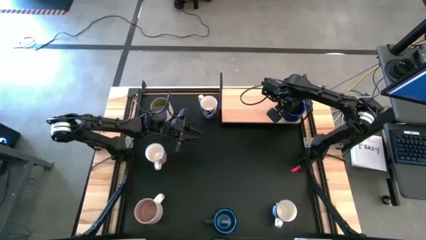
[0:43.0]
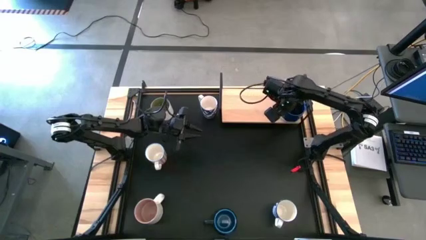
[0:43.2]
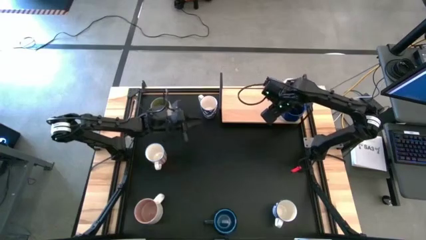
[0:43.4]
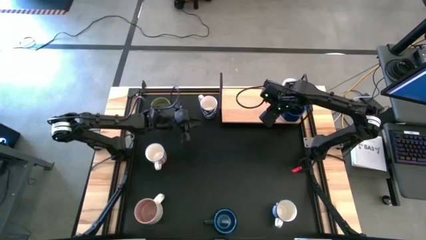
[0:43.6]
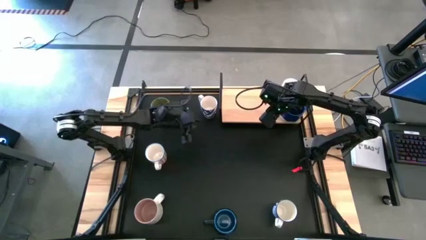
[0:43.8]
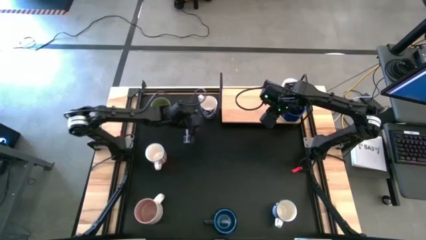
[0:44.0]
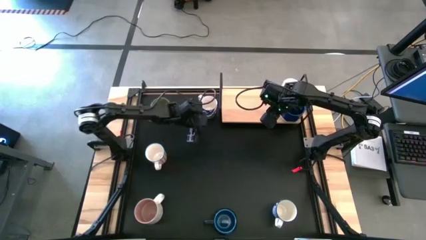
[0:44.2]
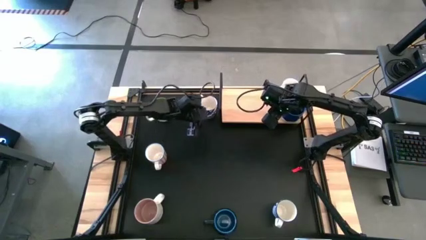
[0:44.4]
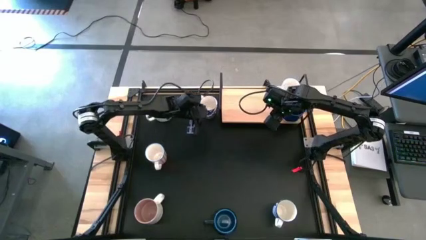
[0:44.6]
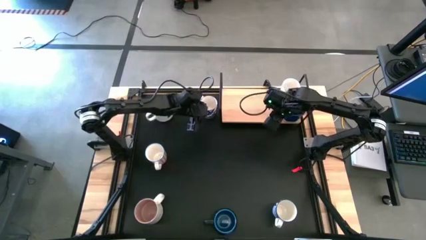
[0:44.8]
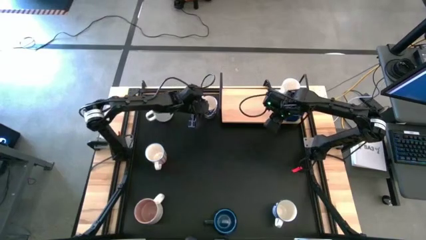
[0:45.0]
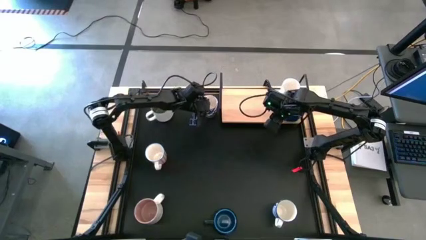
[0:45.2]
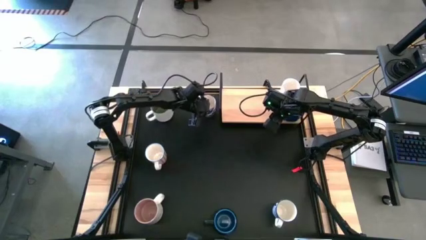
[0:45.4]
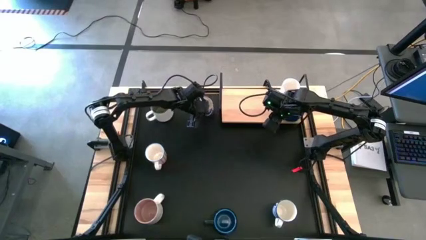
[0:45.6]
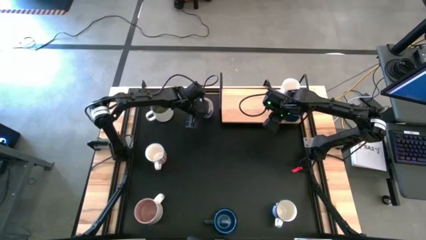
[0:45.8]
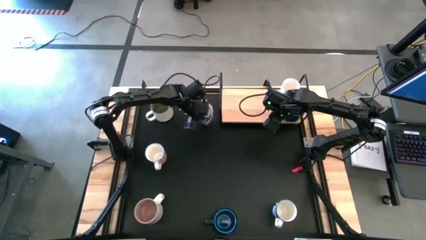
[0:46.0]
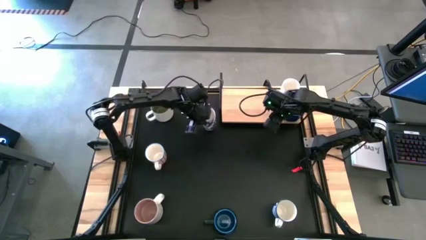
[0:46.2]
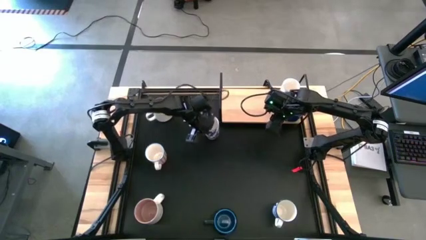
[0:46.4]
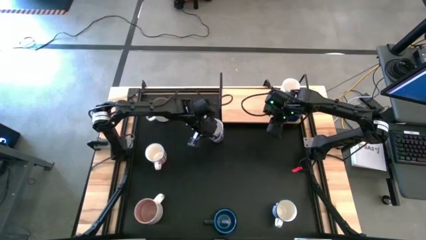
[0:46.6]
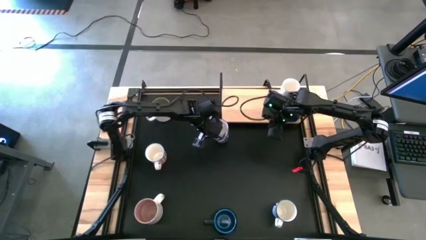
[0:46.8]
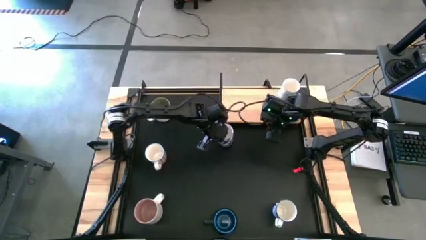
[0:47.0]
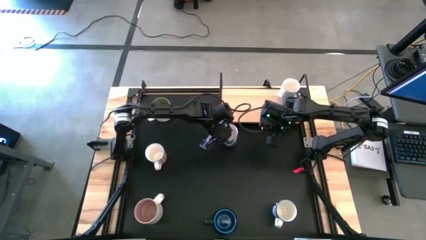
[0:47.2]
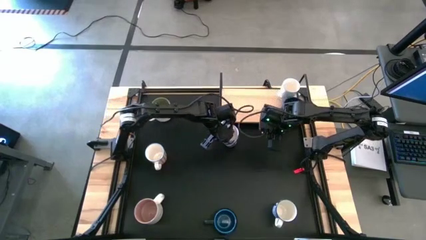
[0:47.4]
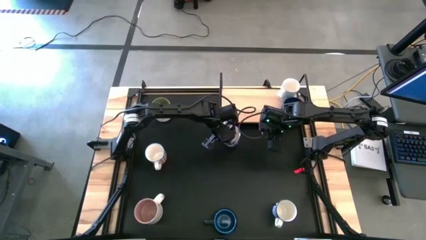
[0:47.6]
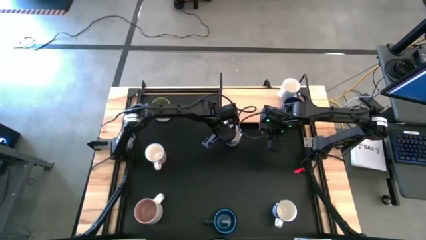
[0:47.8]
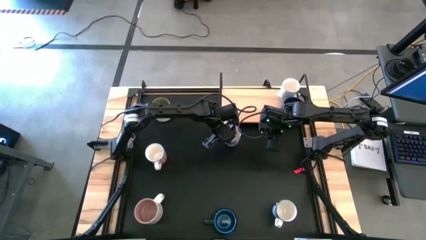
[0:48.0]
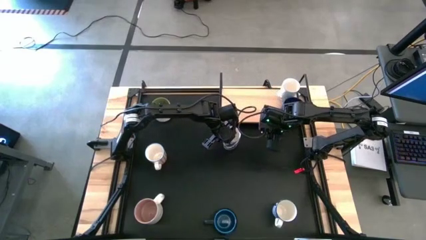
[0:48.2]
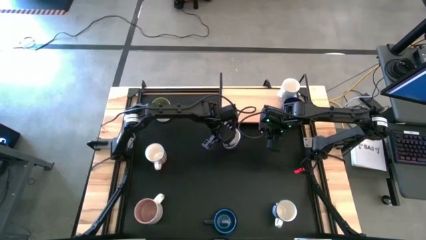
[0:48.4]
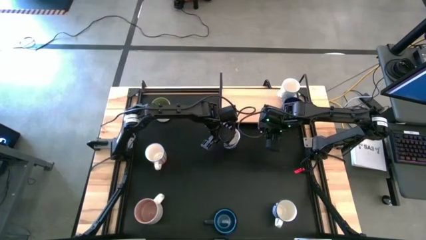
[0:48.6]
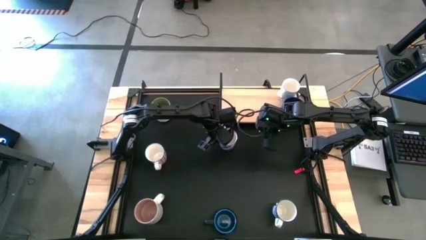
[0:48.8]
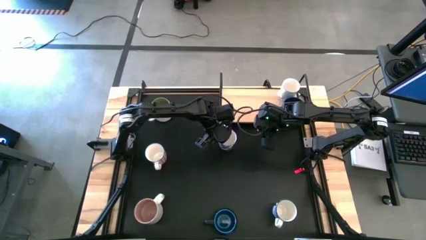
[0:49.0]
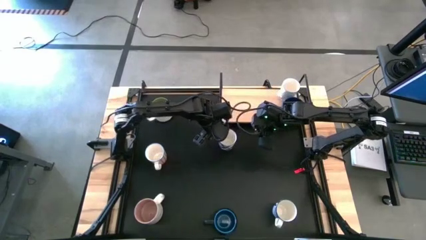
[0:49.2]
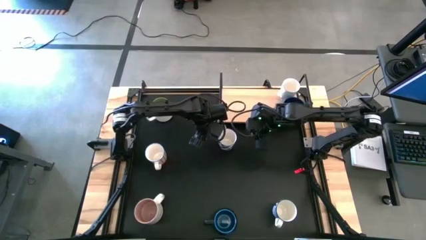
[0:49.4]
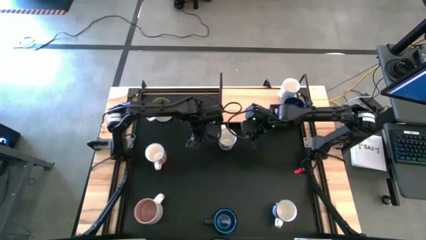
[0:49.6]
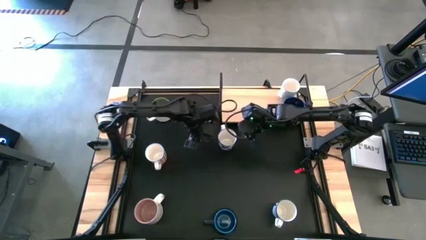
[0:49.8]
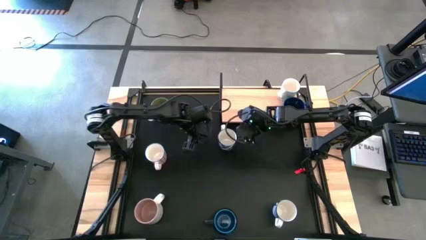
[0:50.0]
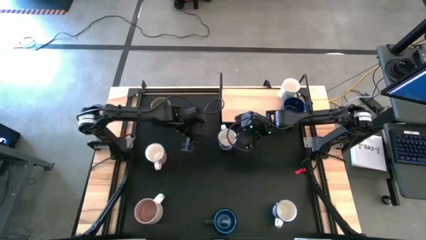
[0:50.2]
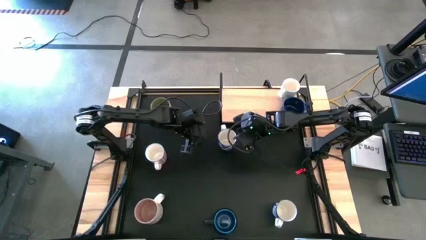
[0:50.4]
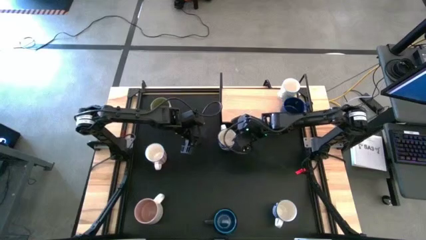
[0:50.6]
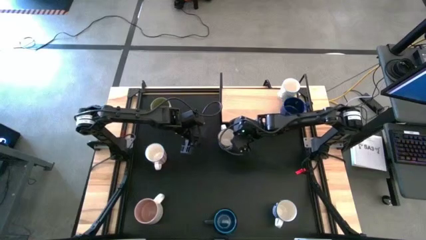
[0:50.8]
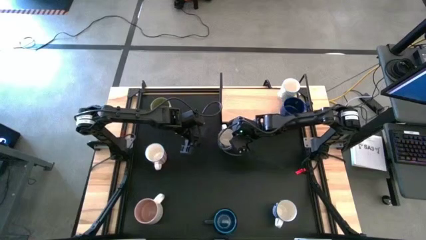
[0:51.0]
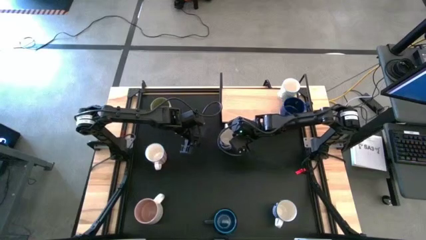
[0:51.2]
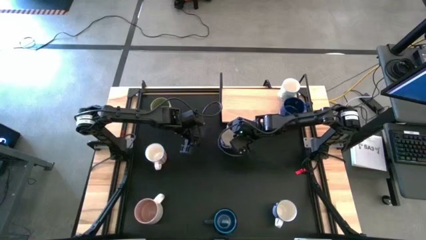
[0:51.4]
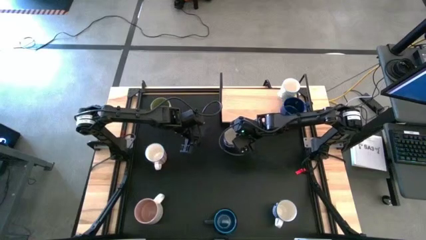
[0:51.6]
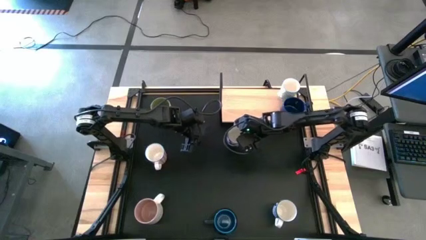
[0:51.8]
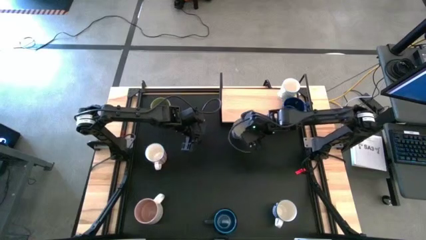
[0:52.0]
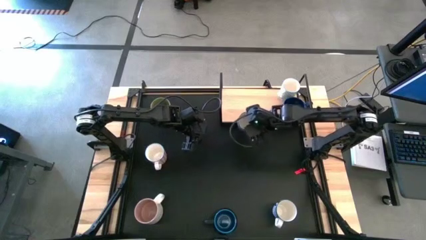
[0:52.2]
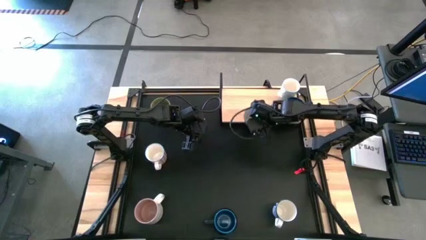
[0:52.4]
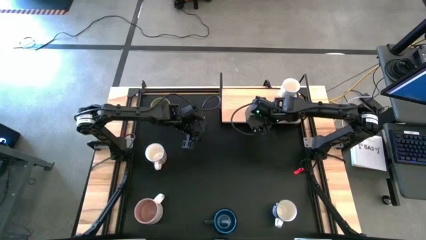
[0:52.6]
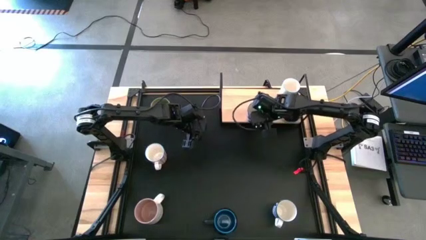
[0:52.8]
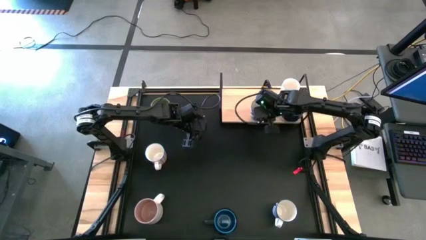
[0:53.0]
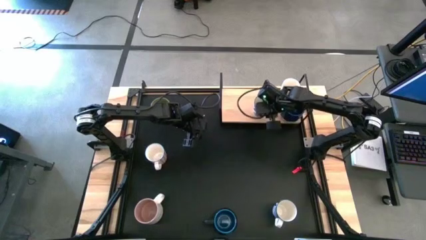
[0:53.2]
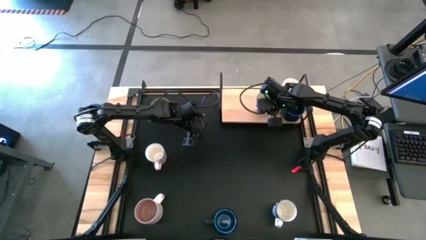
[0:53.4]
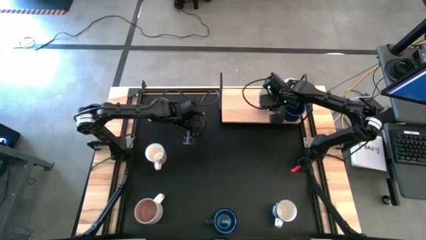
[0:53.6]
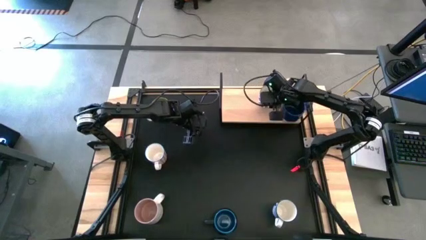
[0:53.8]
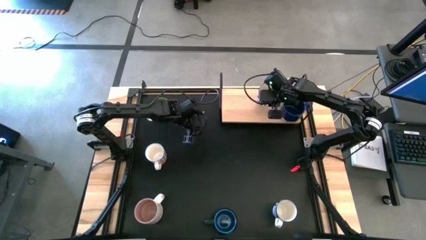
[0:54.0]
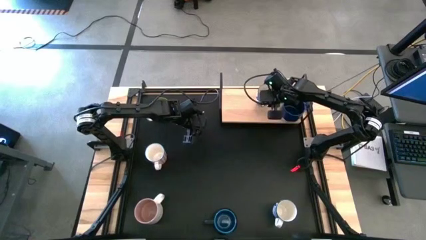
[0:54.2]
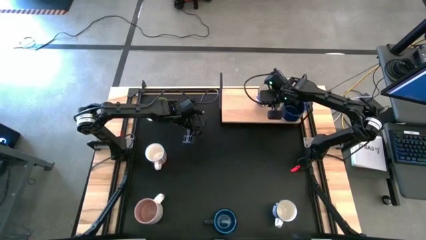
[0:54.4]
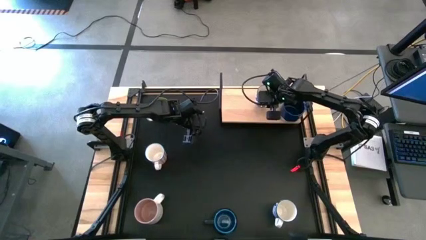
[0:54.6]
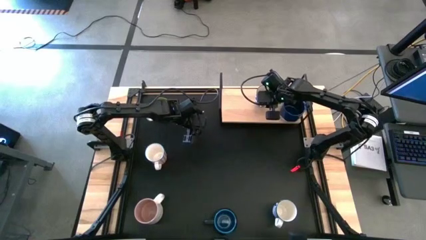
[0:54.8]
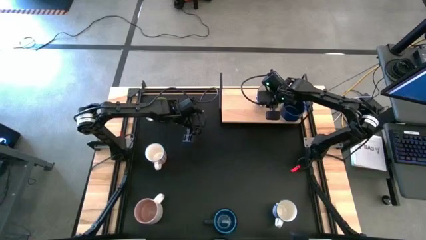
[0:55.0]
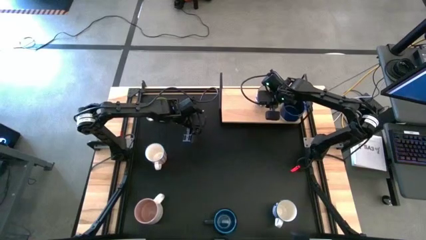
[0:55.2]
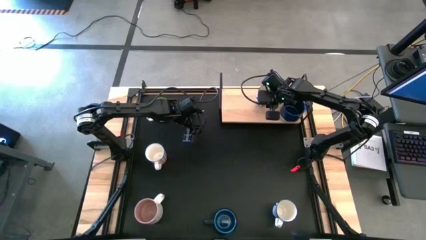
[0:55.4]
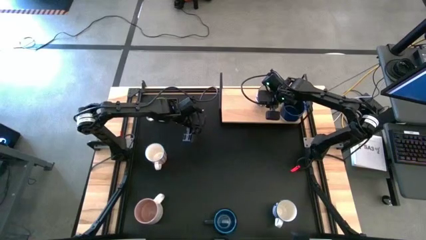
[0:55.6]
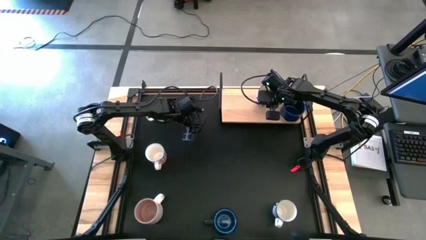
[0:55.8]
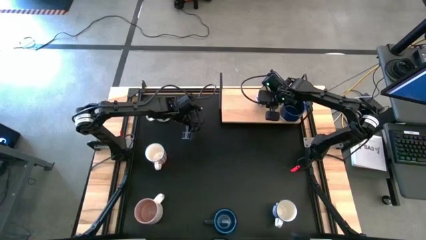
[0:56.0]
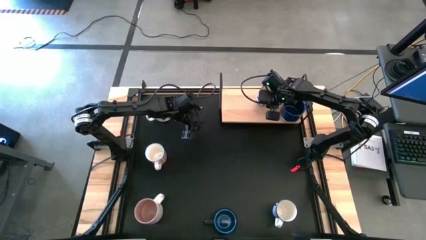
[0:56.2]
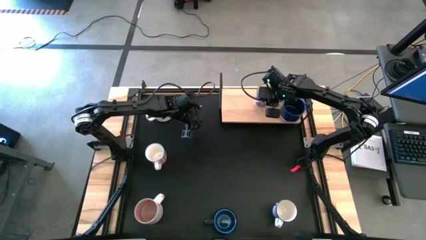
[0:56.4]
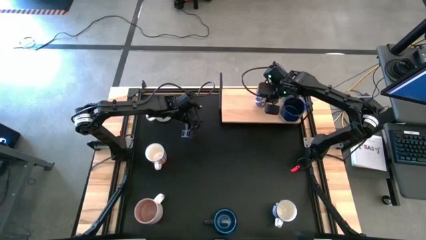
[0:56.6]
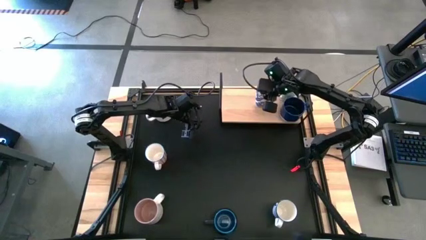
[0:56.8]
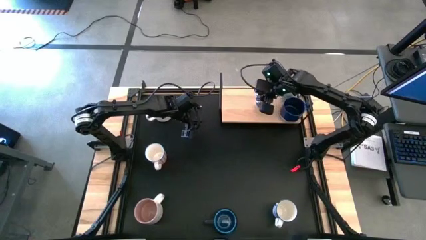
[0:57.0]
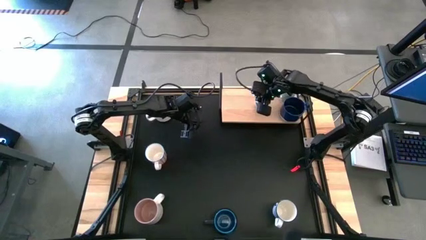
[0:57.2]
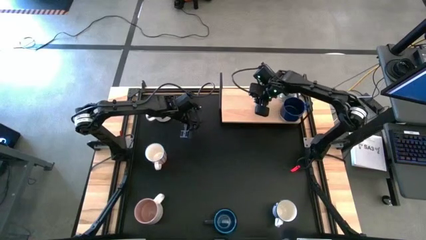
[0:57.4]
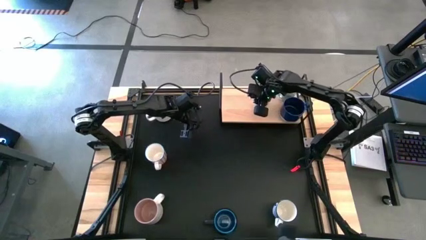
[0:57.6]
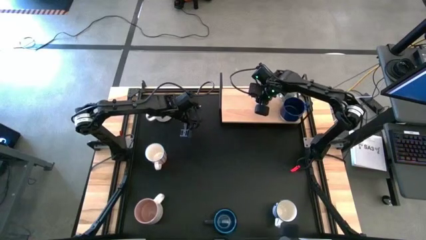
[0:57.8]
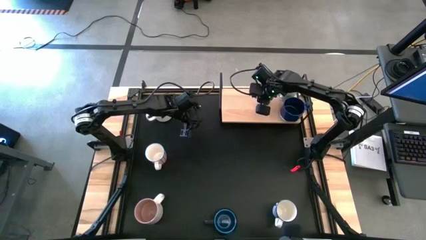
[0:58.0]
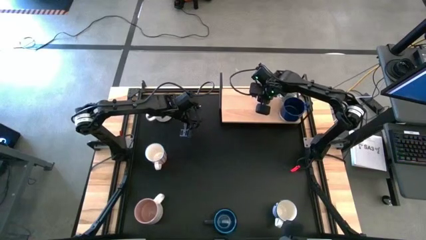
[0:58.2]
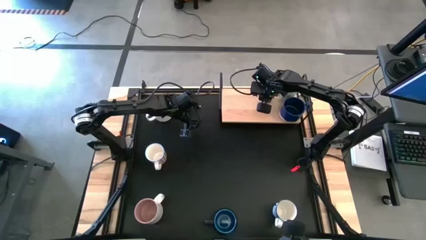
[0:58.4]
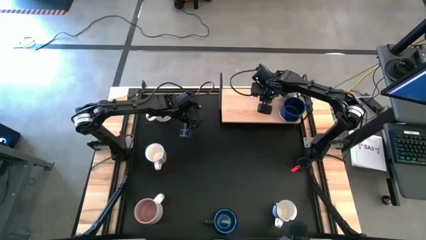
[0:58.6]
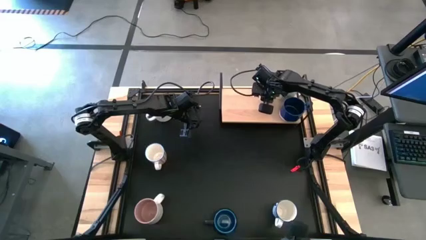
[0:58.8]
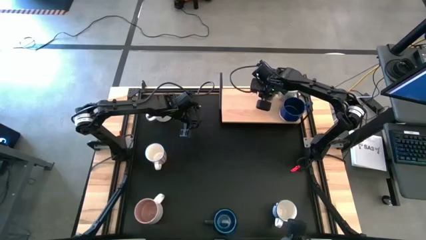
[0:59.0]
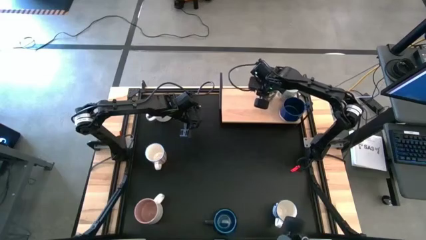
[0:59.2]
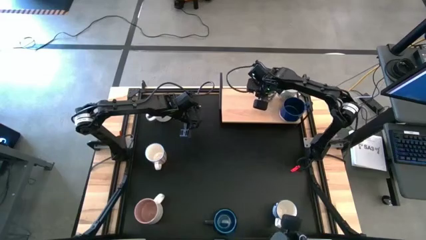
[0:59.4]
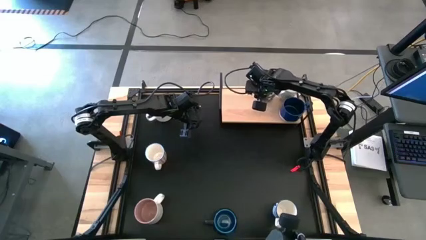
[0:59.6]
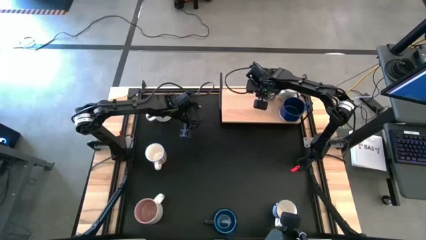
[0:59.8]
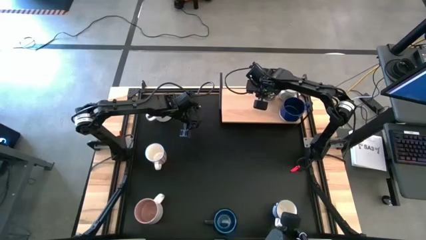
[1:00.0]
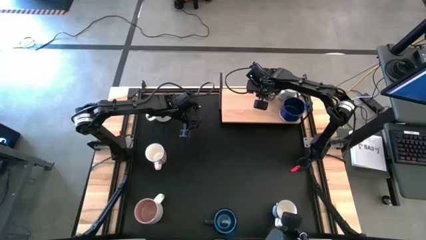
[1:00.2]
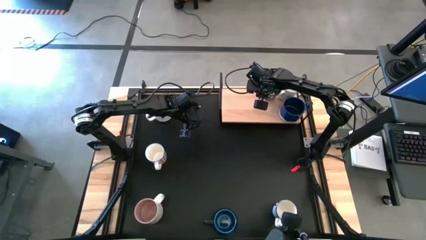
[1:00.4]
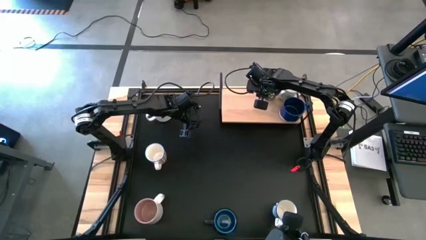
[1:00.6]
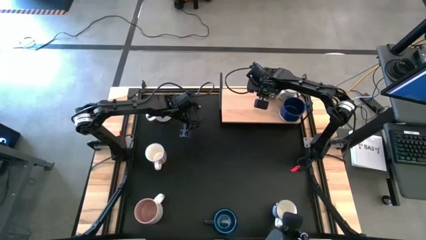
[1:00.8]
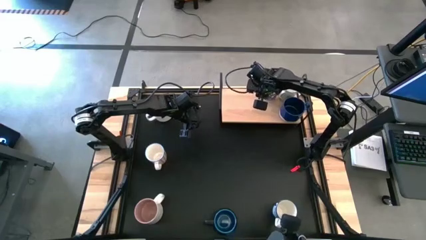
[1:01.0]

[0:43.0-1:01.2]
Task: Place coffee mugs
Put the top blue patterned mug on the shelf
